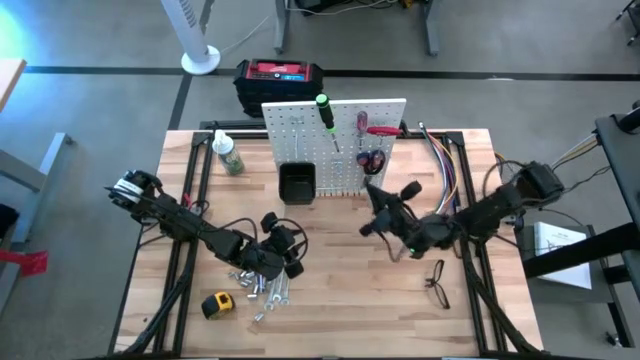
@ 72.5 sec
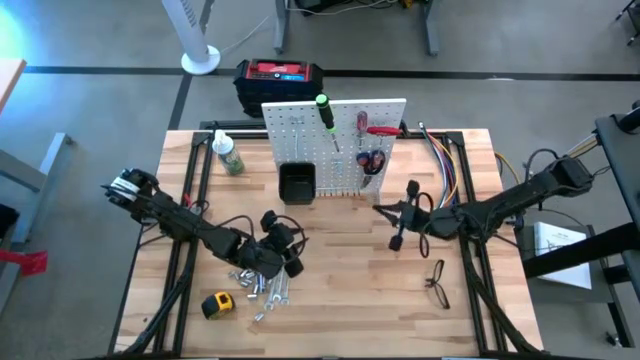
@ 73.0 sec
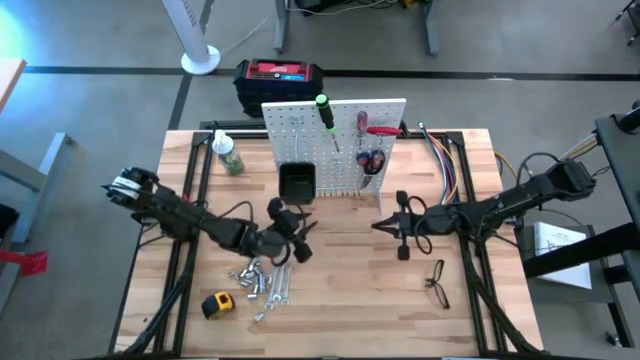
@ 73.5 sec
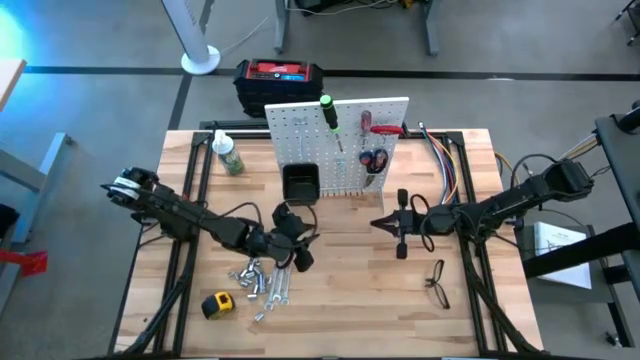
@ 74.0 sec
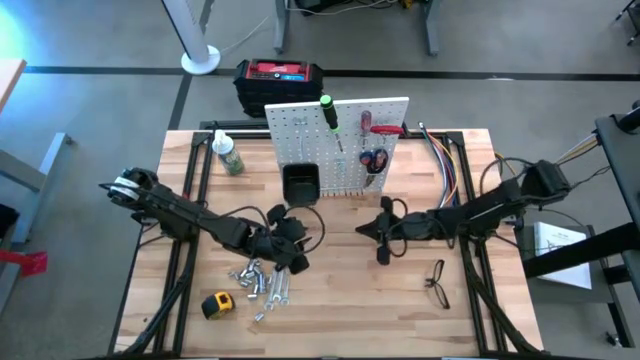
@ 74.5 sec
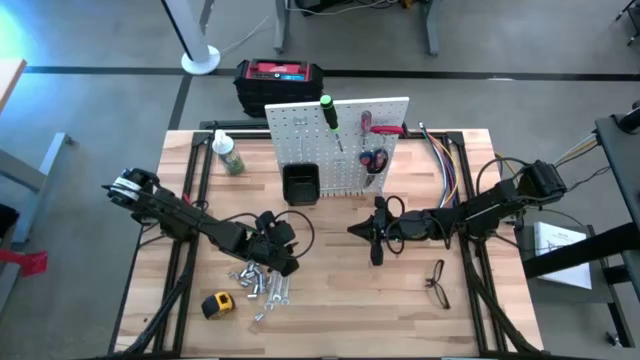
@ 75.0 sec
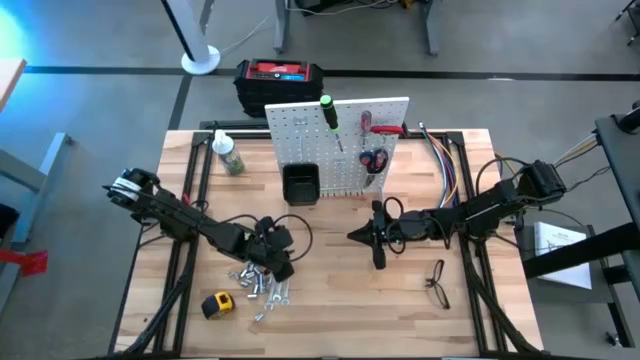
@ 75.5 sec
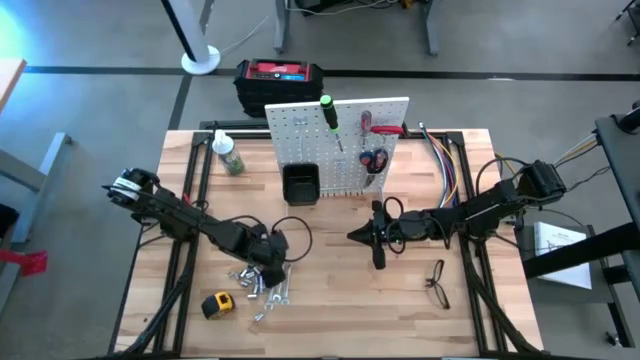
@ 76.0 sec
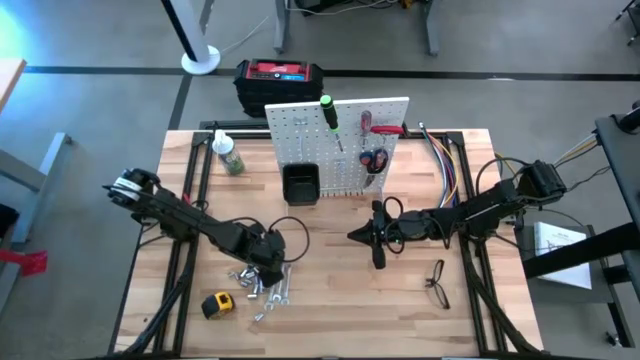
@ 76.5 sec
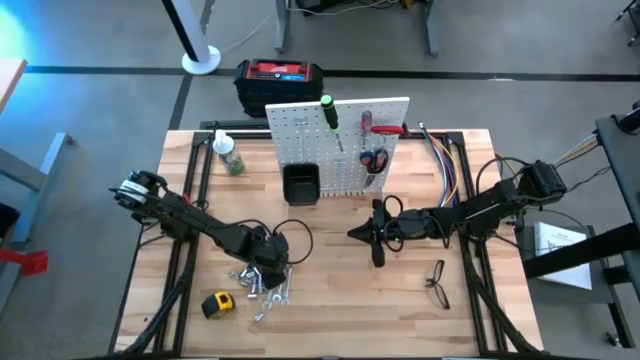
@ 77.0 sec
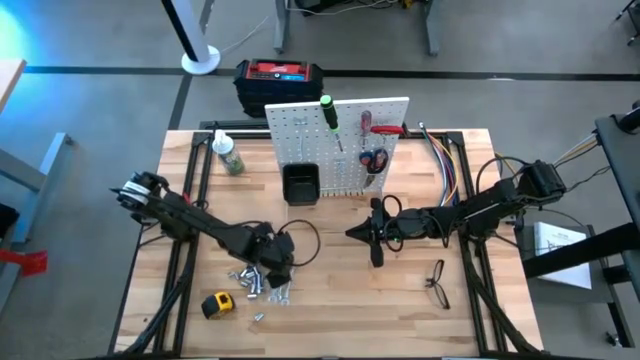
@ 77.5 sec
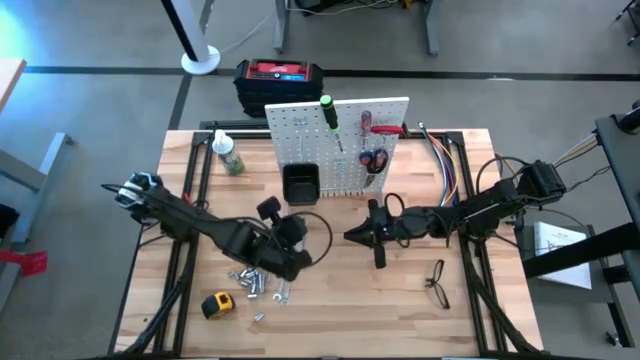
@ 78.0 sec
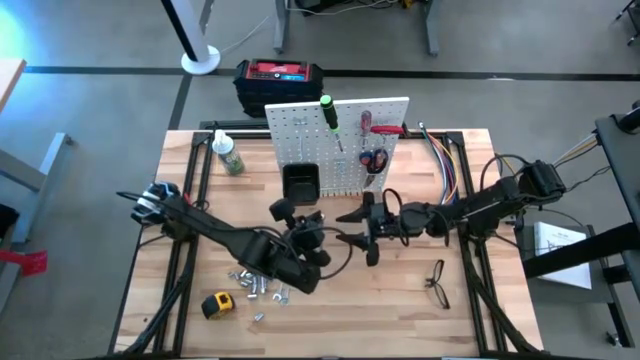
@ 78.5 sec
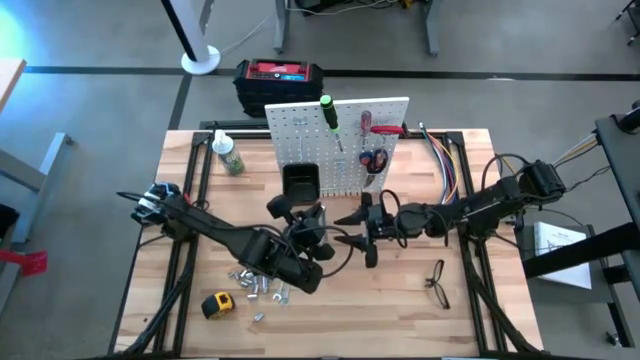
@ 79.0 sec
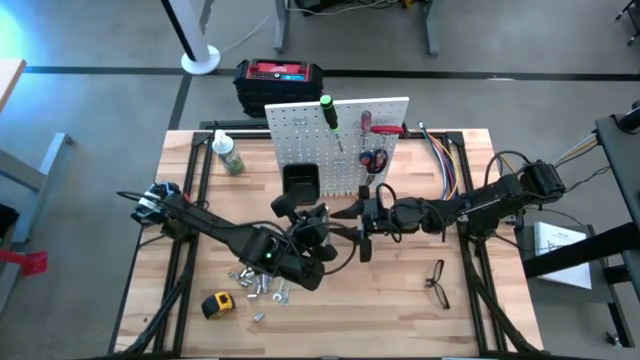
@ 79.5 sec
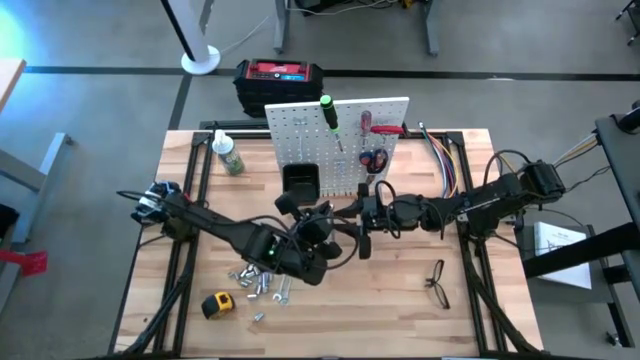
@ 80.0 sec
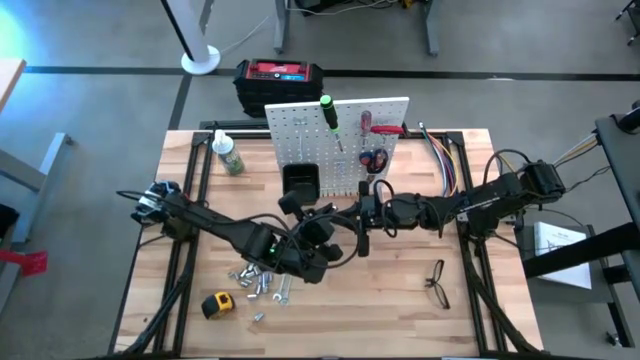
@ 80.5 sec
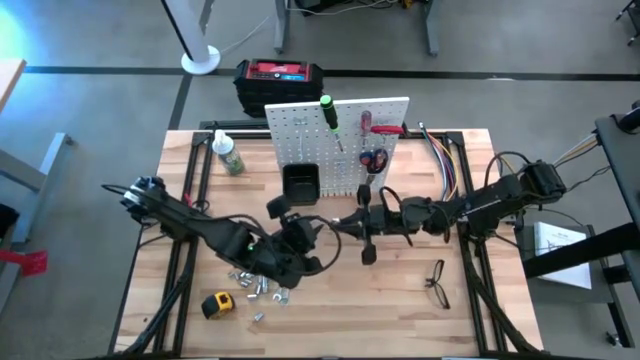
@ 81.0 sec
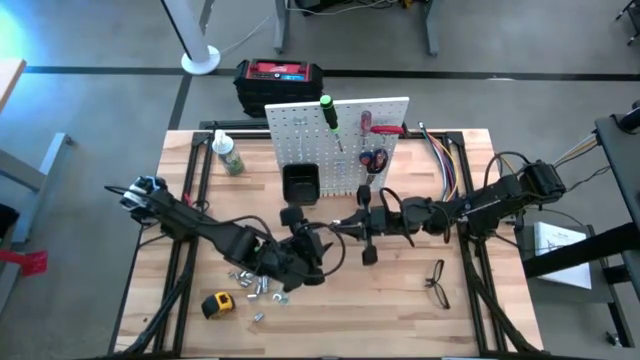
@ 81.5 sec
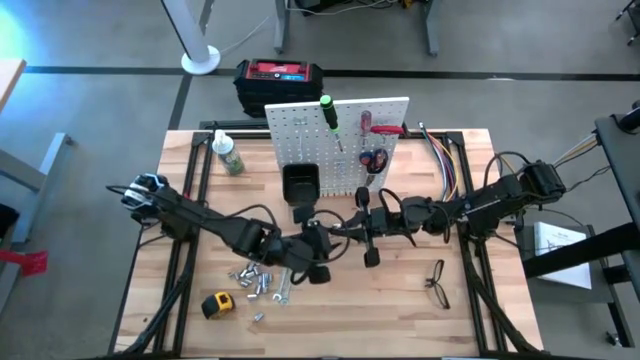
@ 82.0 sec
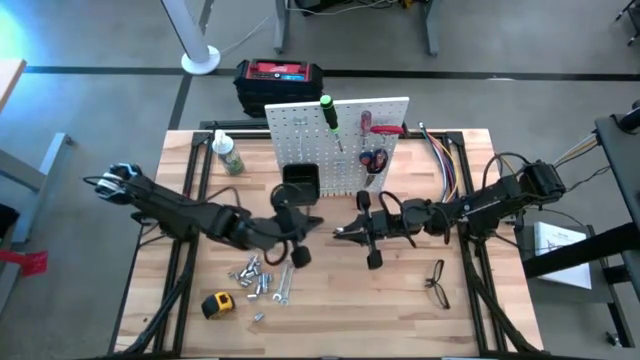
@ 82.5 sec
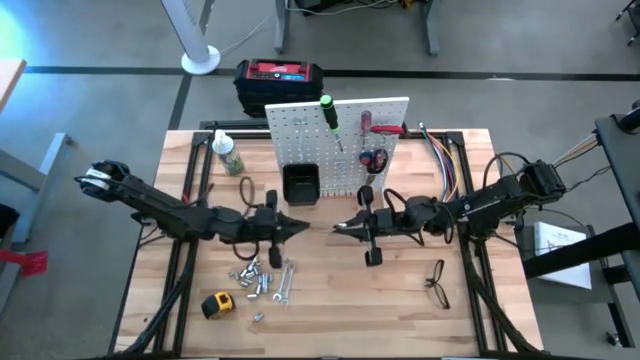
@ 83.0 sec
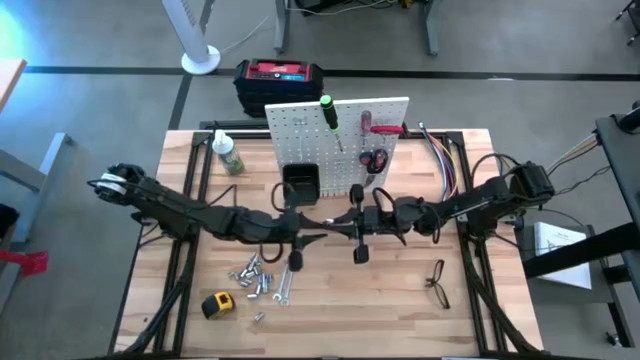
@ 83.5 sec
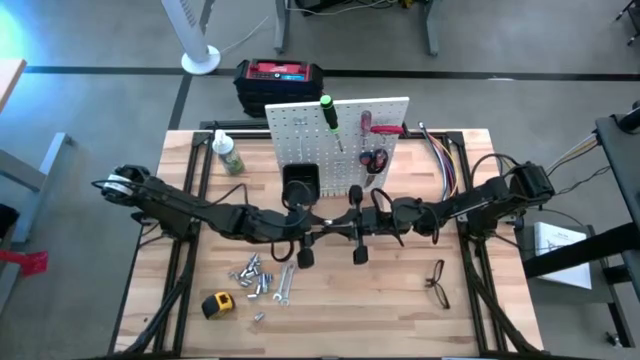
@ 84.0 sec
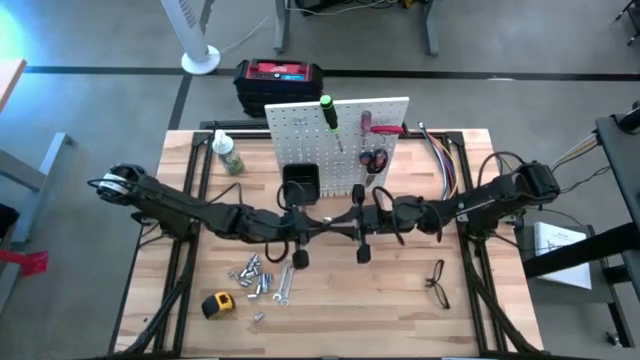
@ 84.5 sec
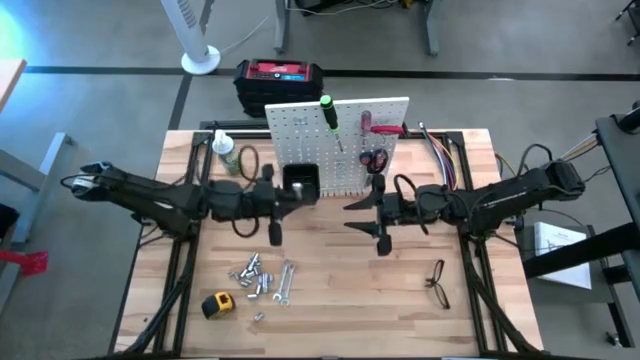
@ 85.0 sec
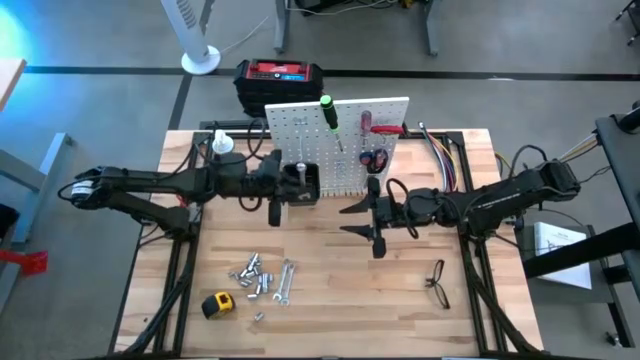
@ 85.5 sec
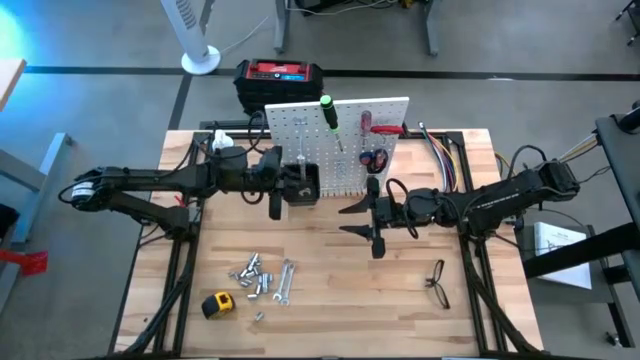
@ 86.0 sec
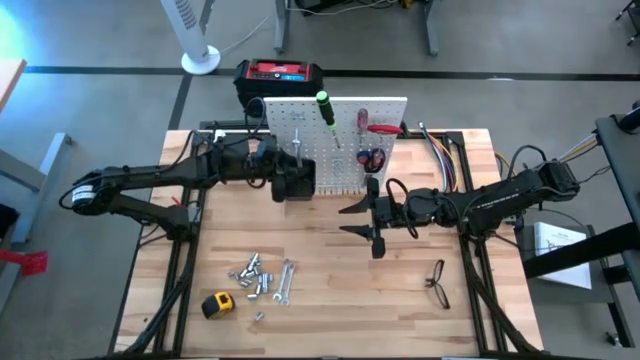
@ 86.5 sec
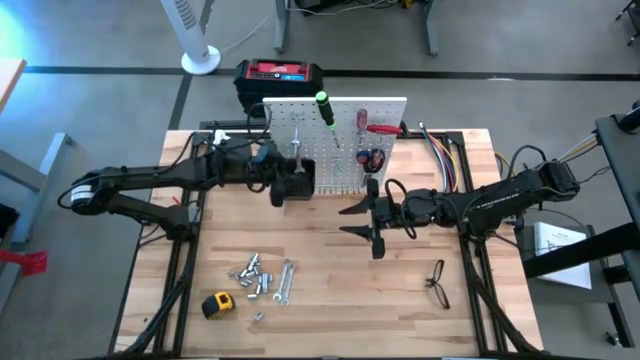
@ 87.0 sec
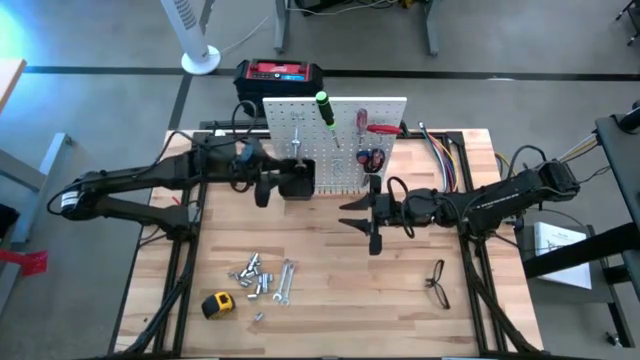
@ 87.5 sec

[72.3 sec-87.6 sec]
Task: Hang tools onto peg board
Hang the left silver wrench on the pegboard

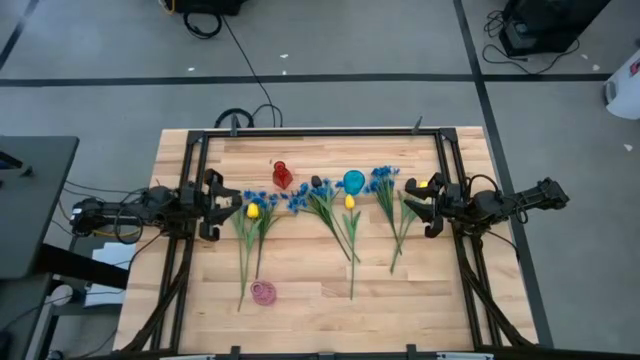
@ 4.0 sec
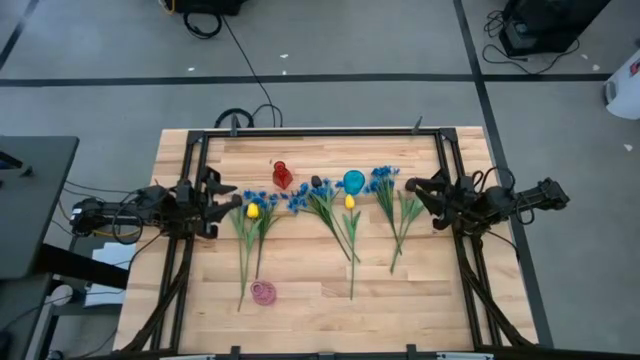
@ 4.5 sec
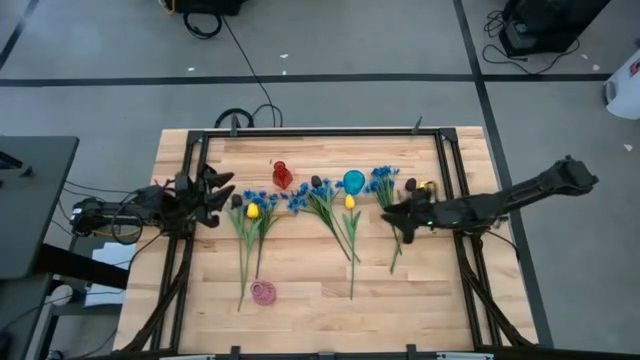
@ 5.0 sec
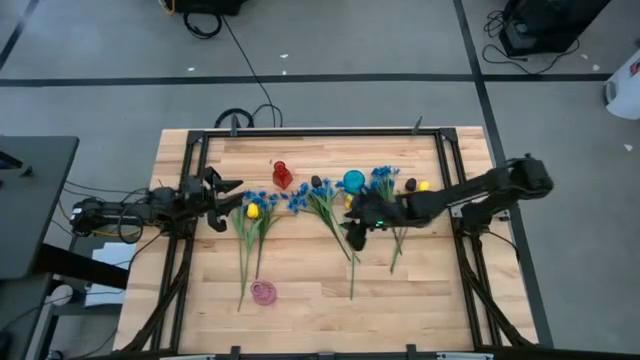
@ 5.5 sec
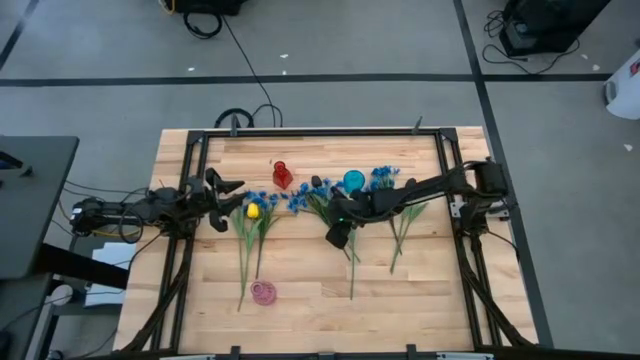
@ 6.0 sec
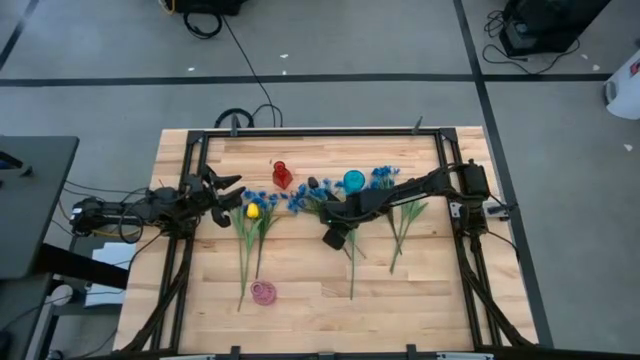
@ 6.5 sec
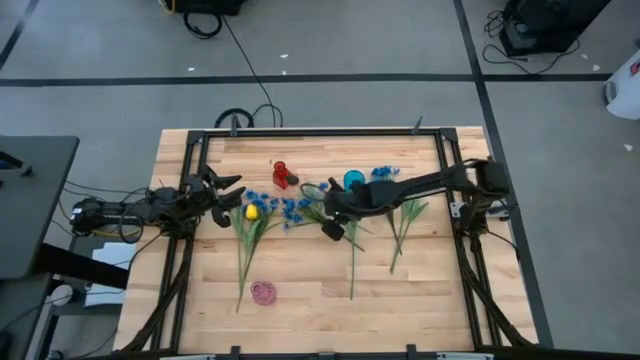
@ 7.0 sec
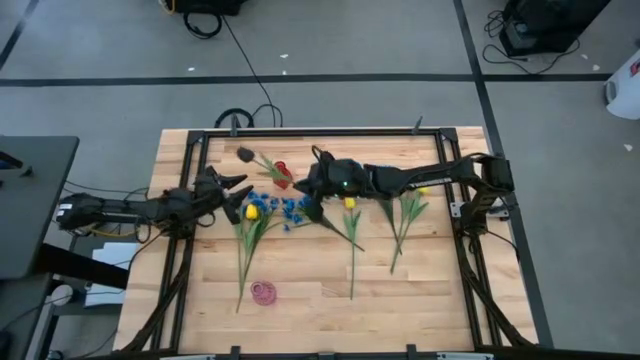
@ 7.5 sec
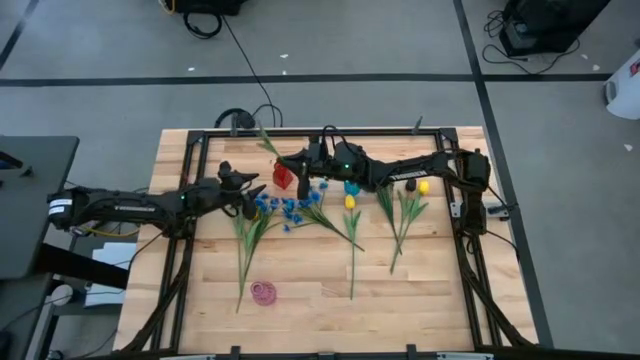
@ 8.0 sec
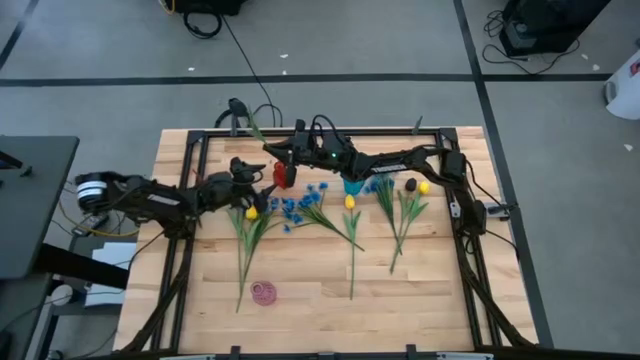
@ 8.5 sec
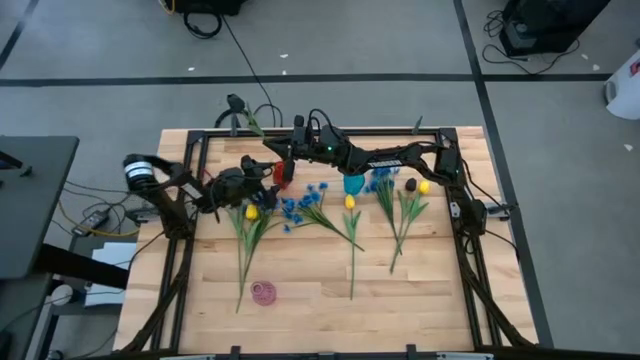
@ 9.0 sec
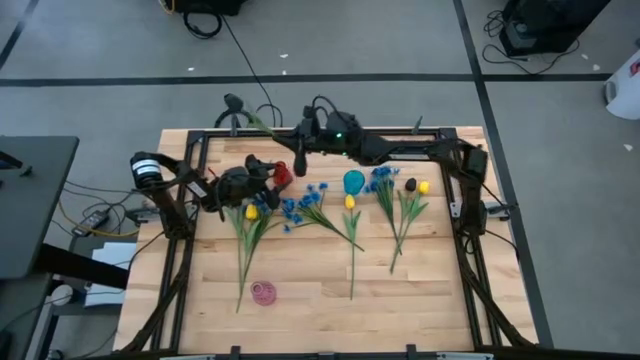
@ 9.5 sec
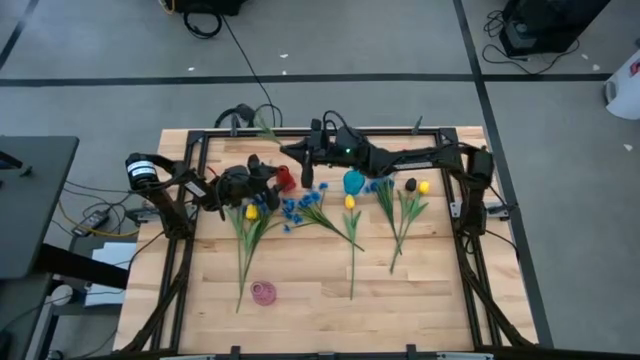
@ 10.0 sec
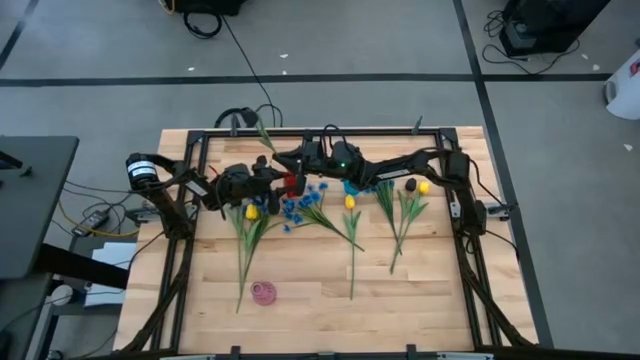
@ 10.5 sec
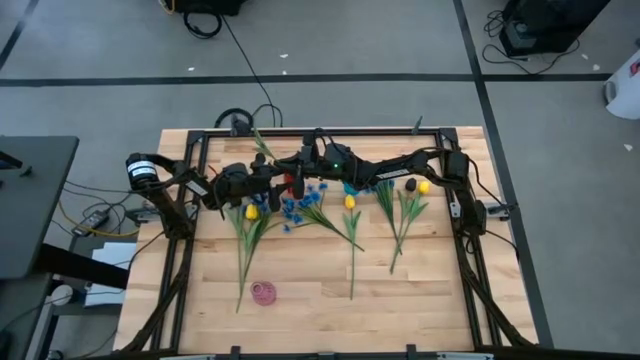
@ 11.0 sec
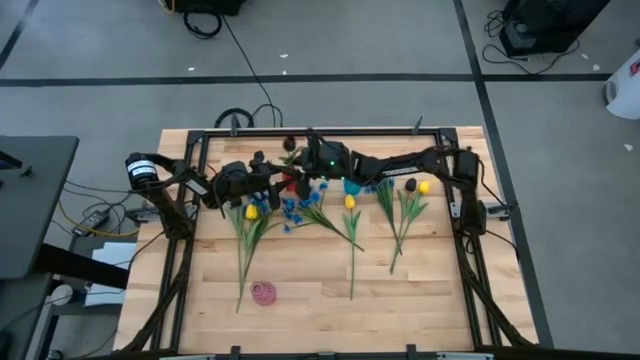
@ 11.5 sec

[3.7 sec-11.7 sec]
Task: Sort flowers into vase by color
Put the middle black tulip into the red vase
